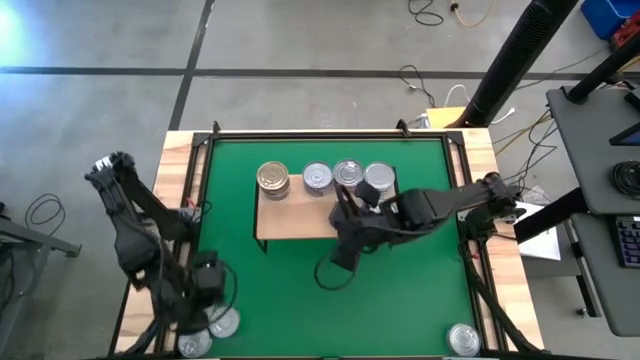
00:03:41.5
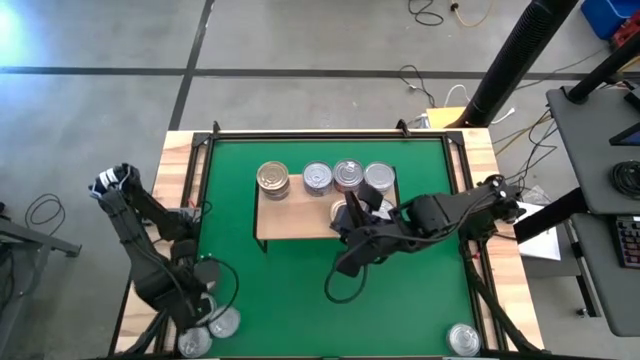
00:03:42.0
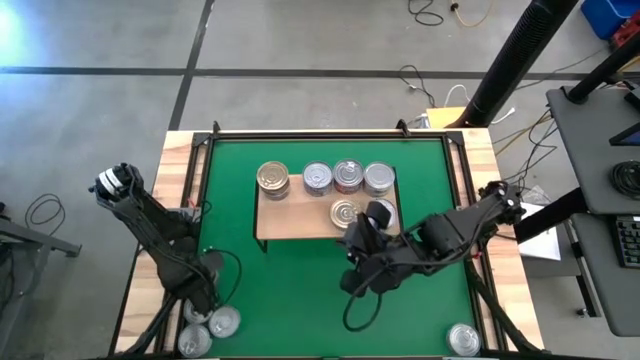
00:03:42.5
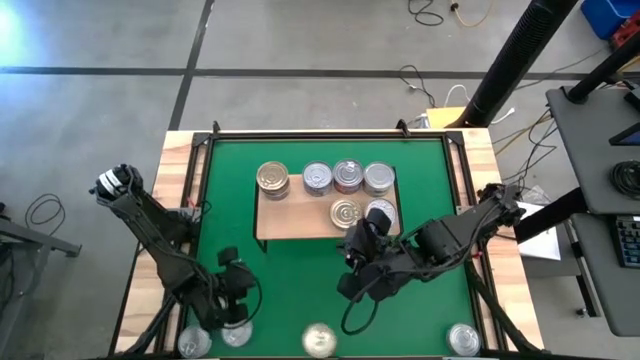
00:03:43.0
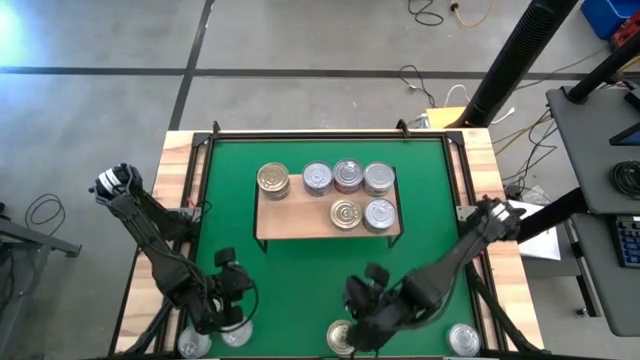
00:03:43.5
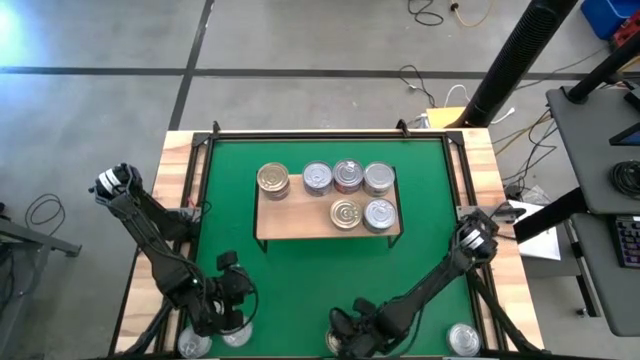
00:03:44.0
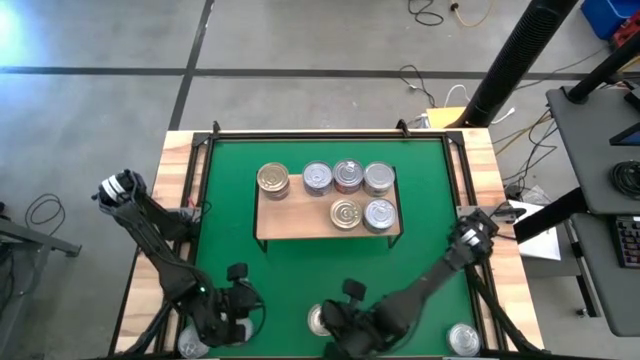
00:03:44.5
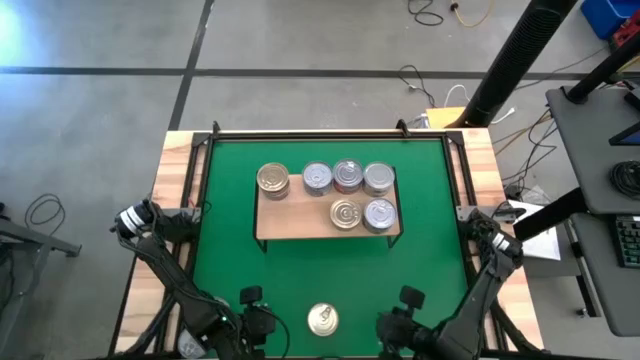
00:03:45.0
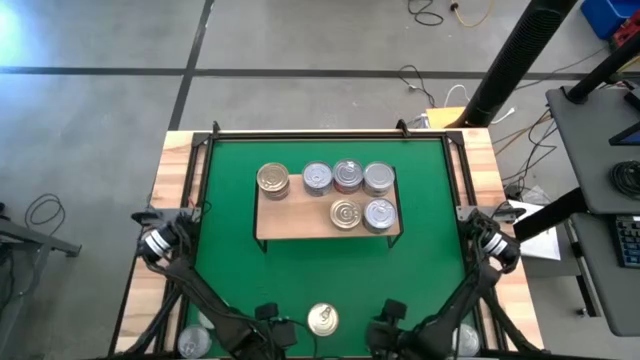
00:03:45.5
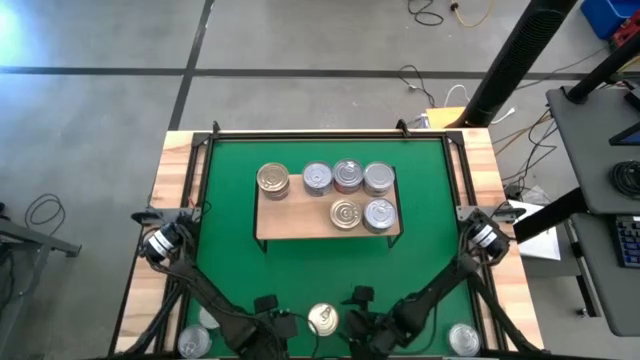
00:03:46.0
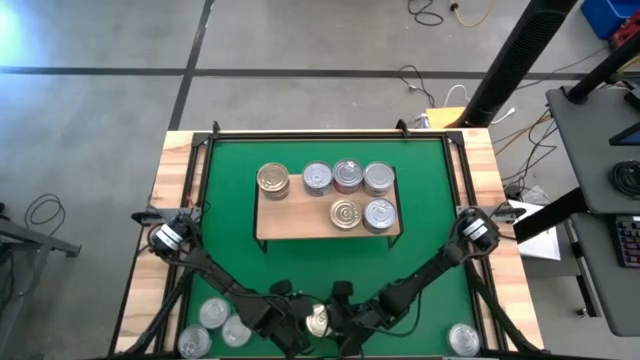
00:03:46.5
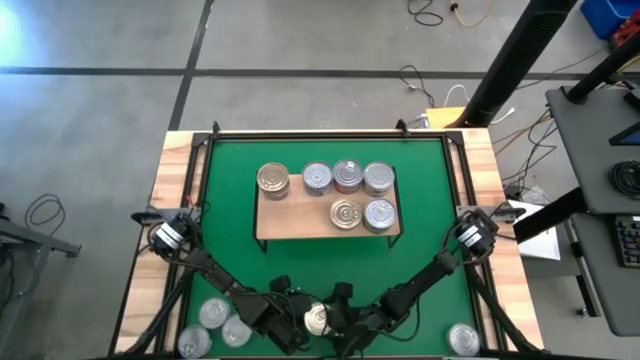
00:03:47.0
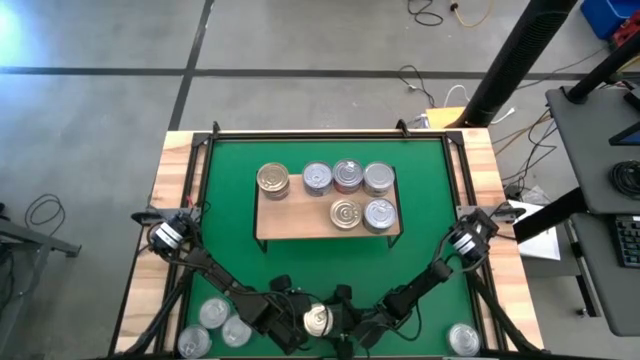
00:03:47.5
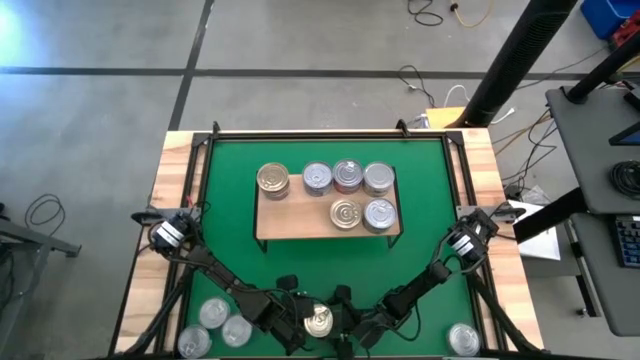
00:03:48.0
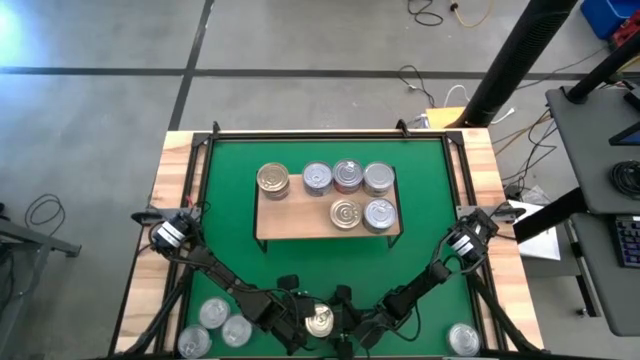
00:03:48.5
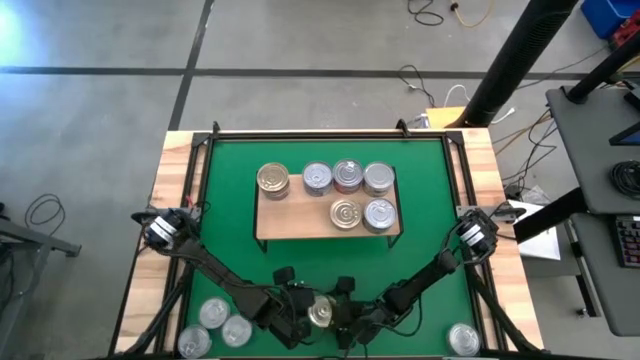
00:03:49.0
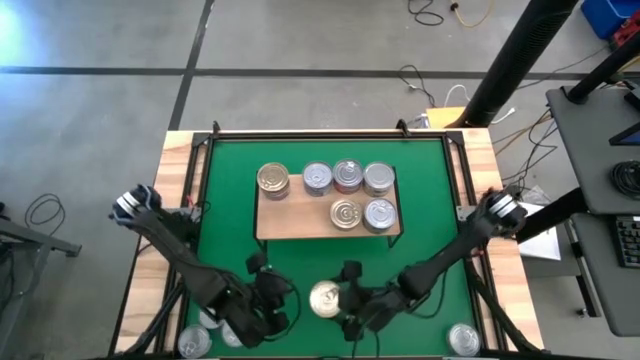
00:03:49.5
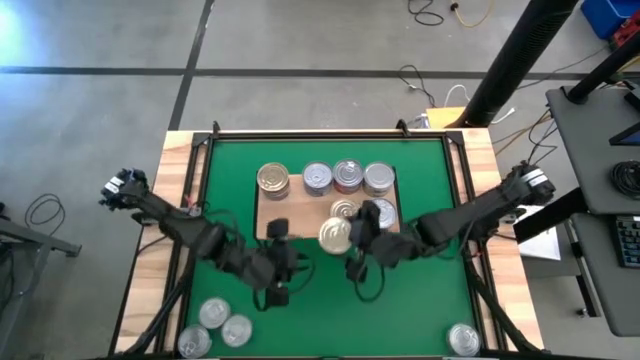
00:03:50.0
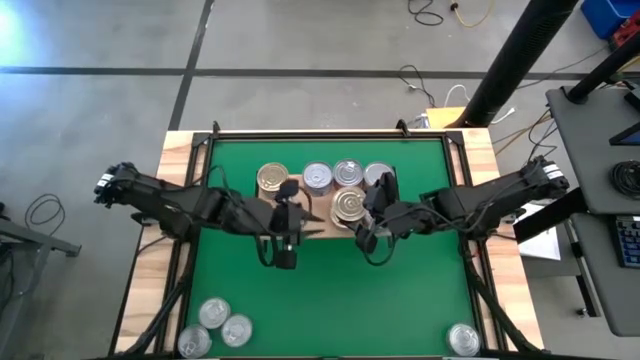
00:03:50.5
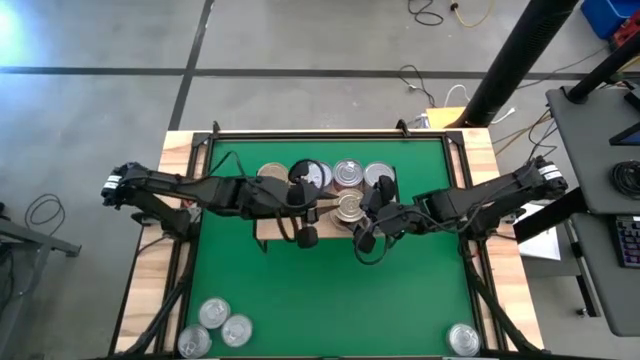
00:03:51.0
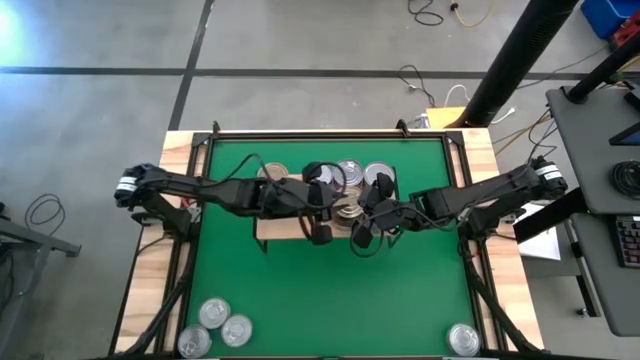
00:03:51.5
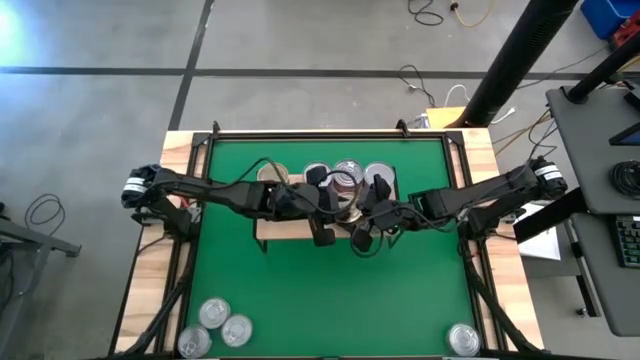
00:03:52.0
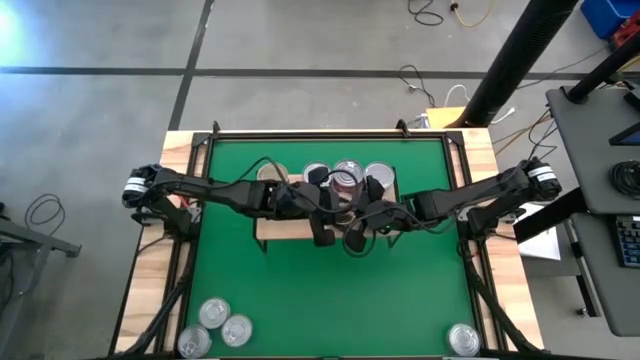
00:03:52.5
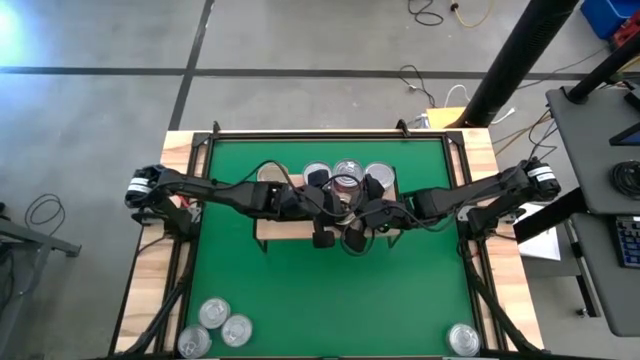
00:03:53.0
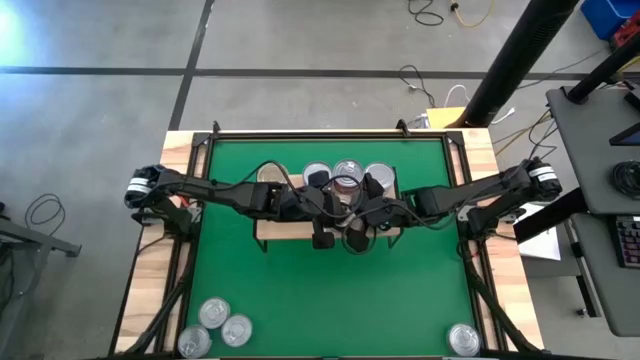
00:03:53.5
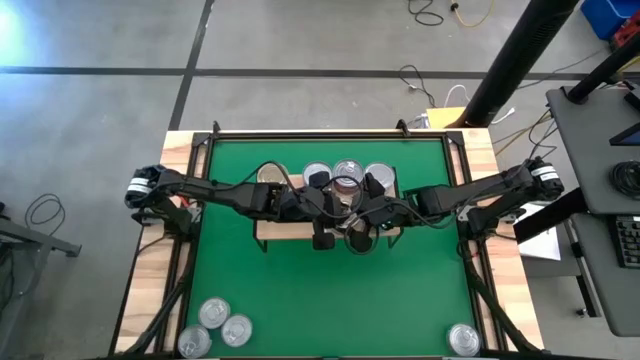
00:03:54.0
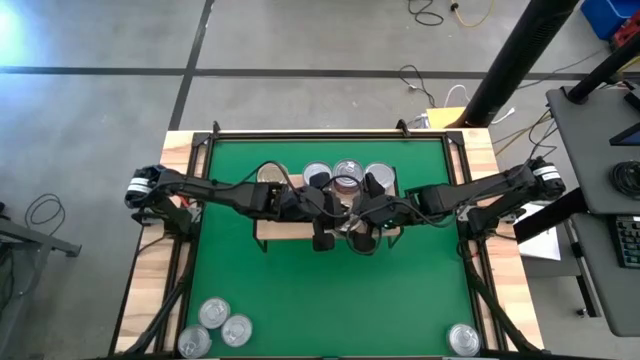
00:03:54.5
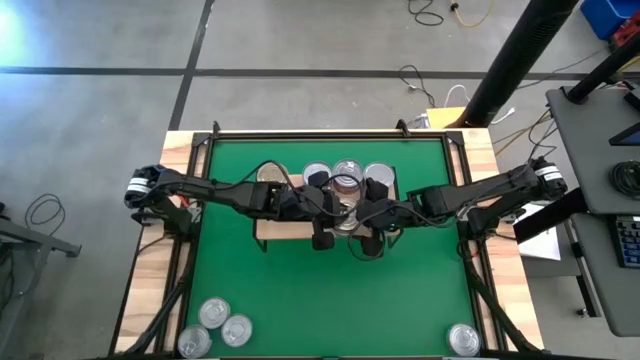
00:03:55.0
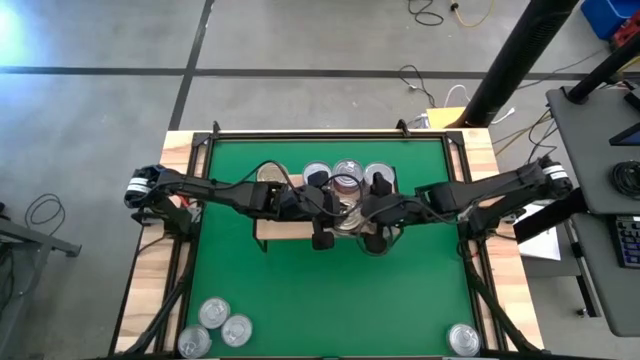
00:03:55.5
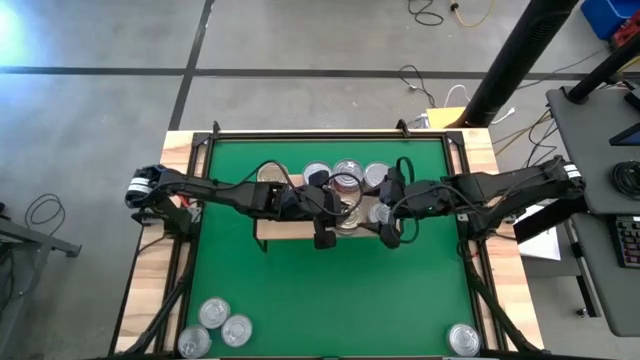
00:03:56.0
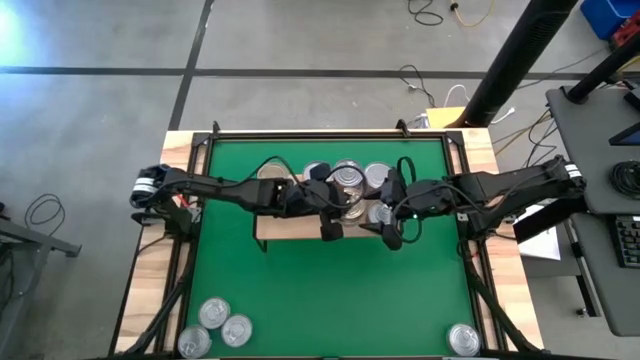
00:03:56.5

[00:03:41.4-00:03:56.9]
Task: Stack canned seafood by type on shelf
Stack the blue and pink tuna can on top of the blue and pink tuna can on the shelf
